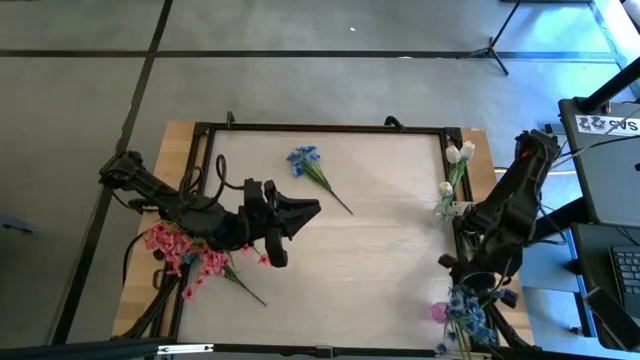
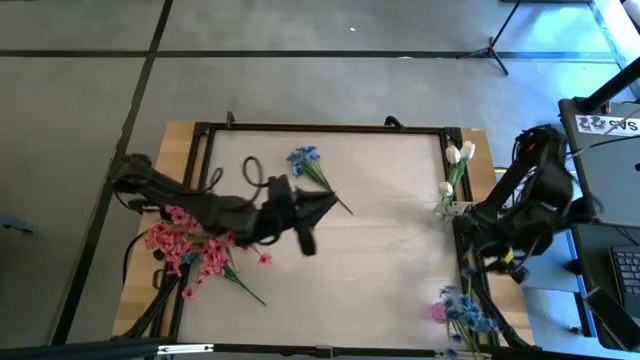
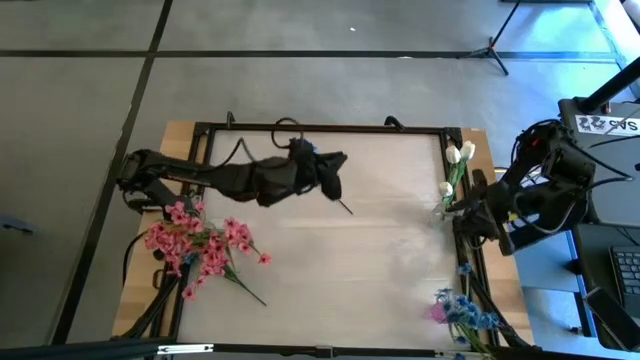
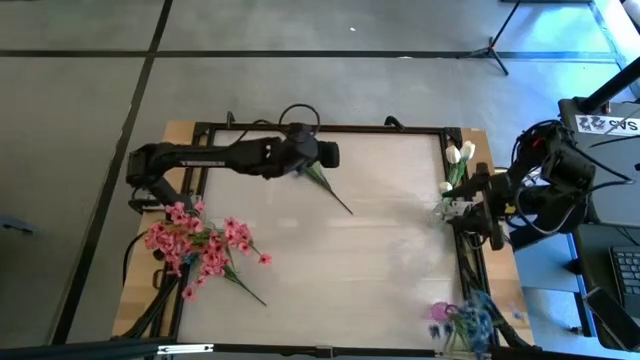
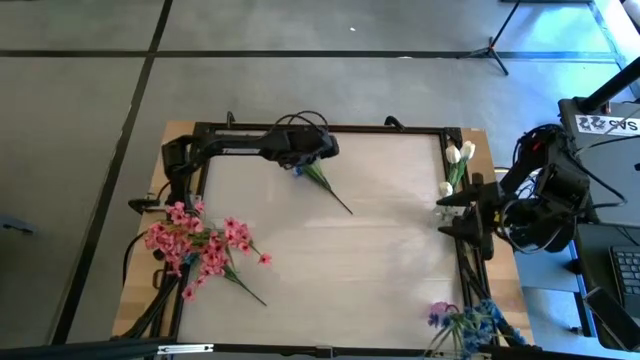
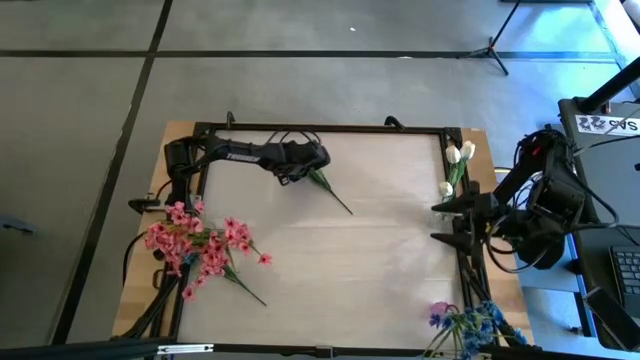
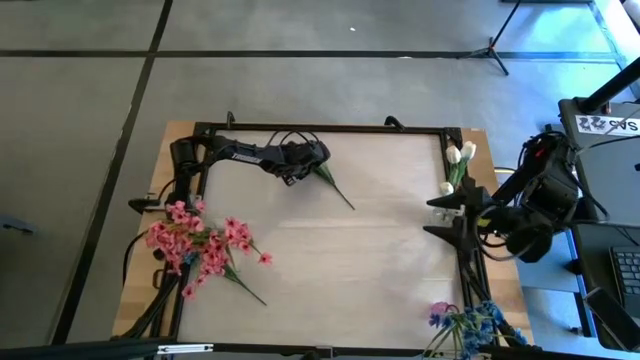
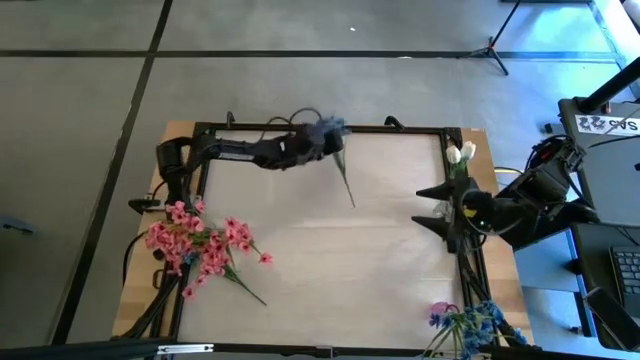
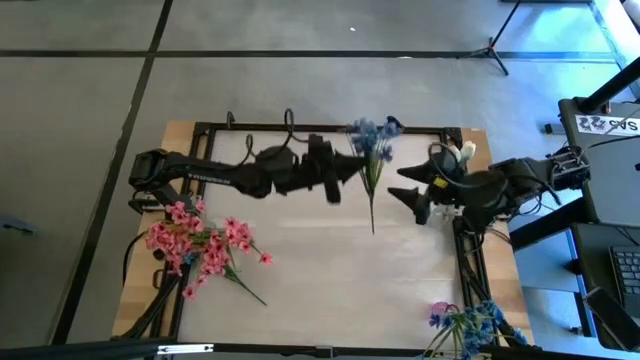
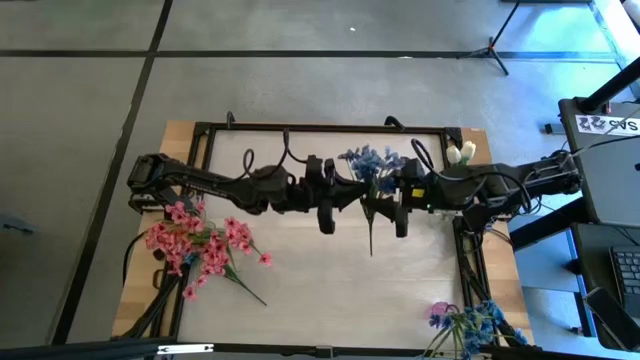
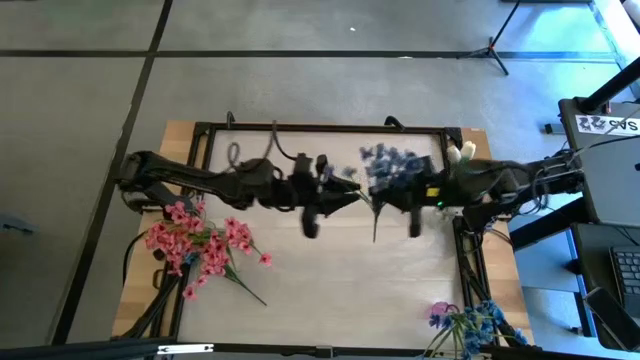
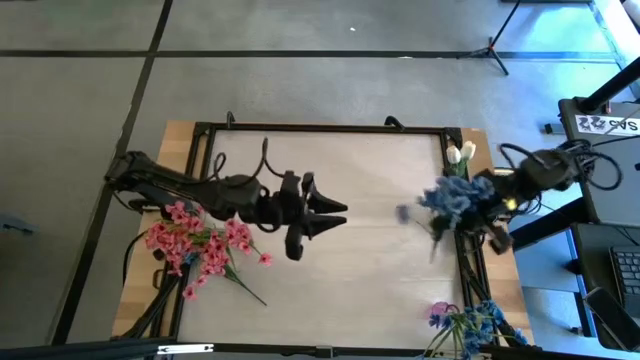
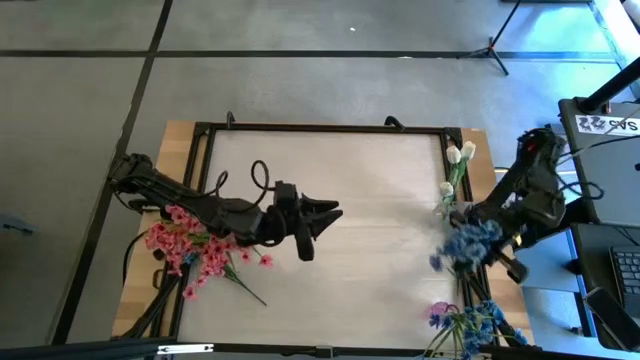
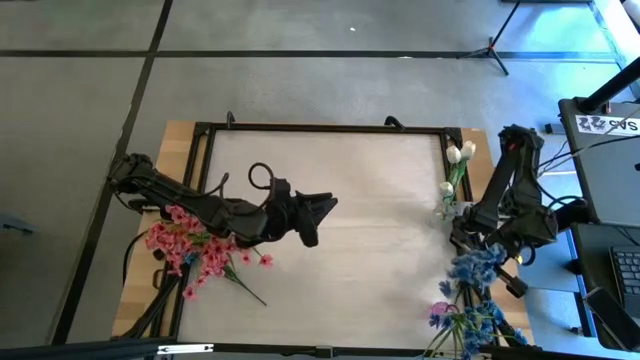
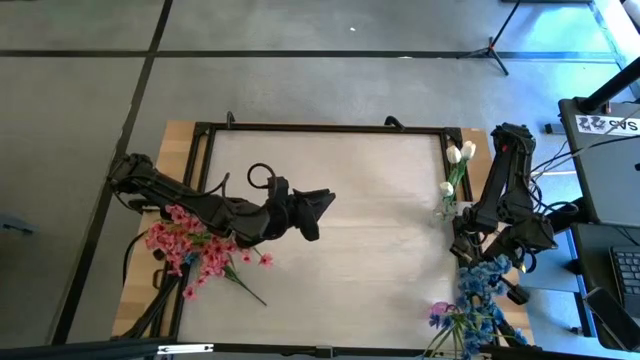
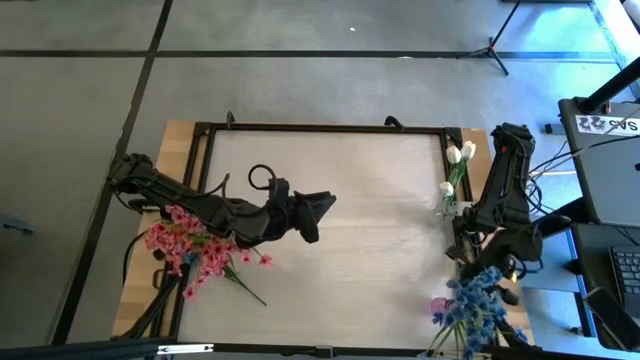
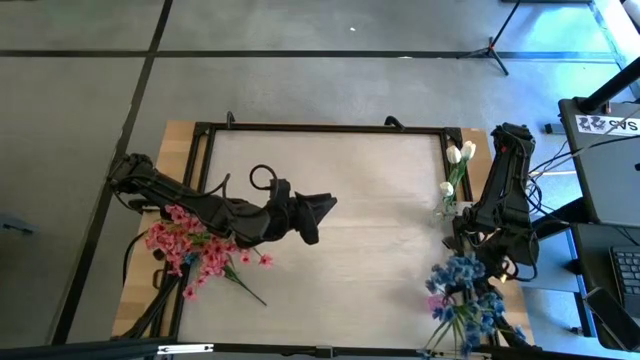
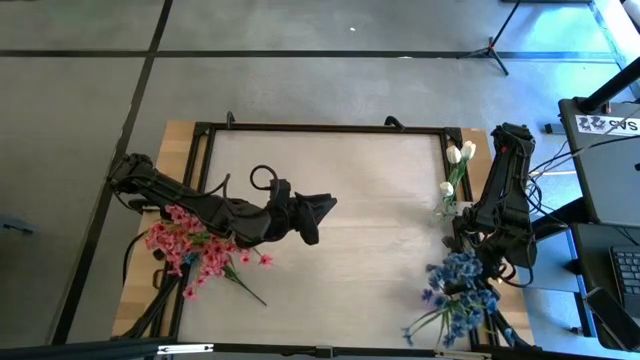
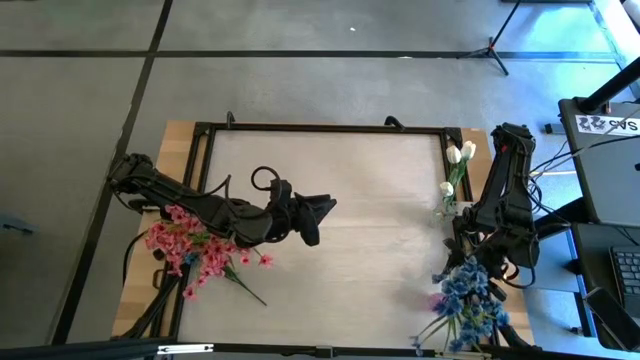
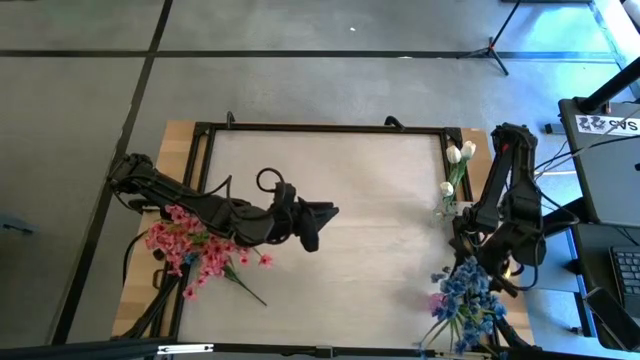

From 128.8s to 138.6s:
Task: Sort flowers into vase by color
Put the top blue flowers into the violet vase

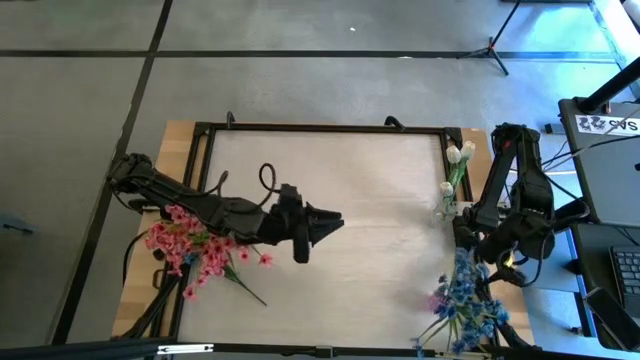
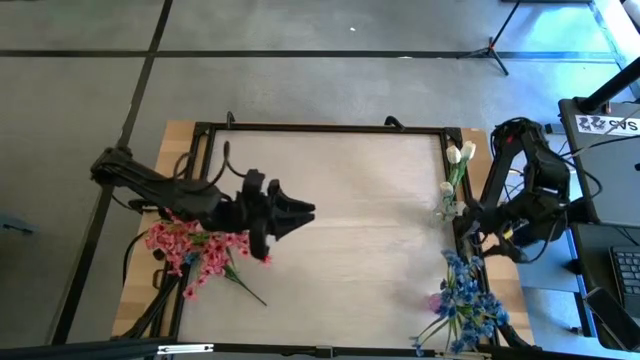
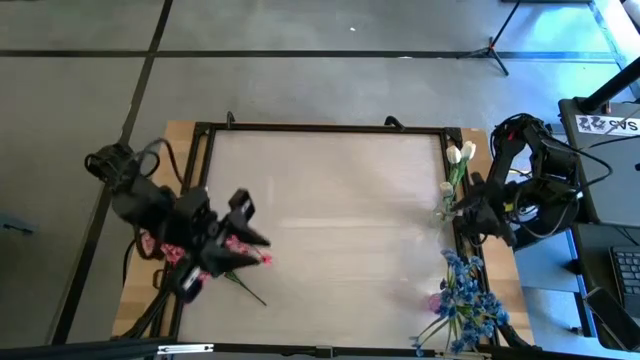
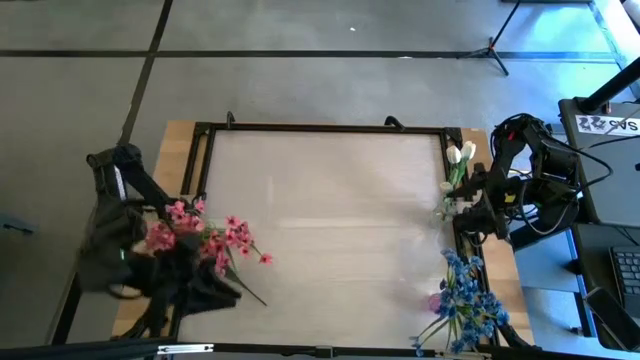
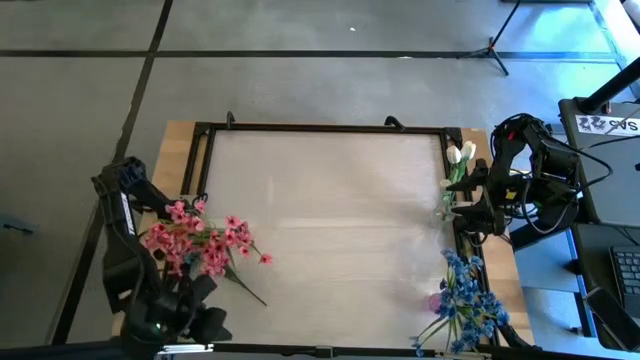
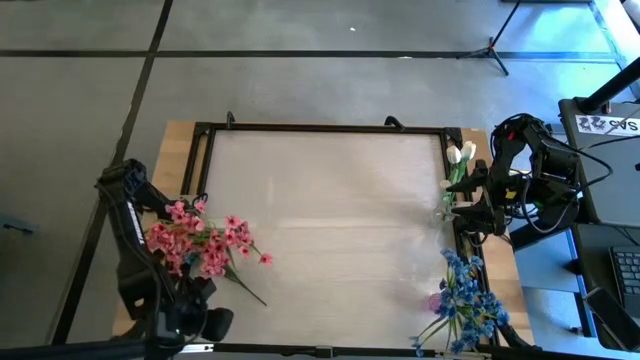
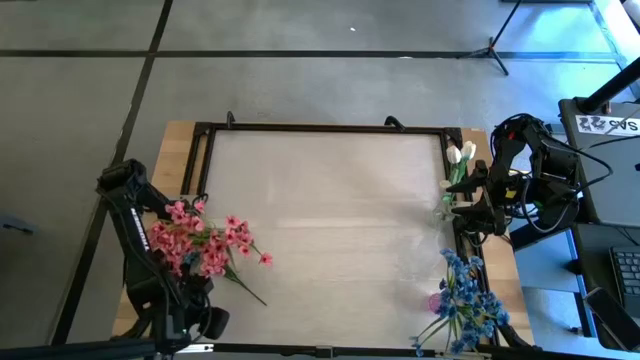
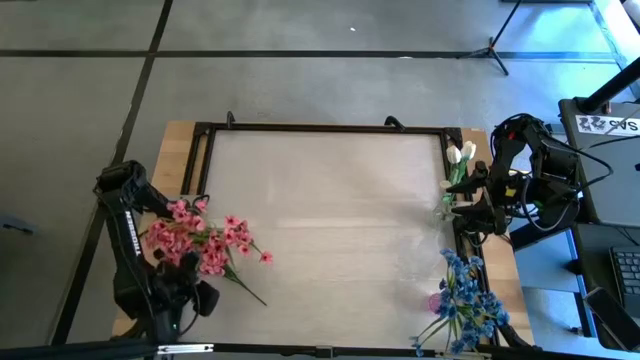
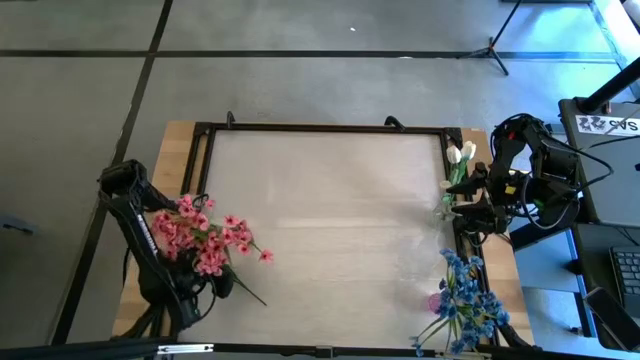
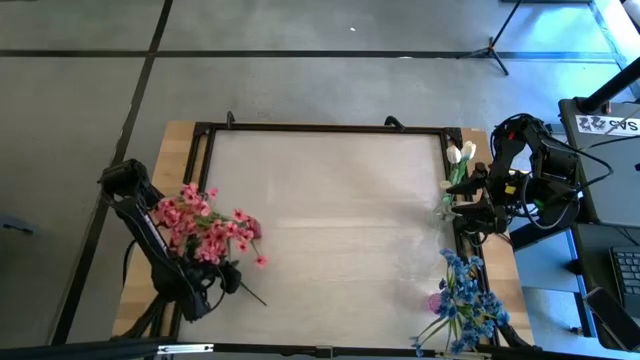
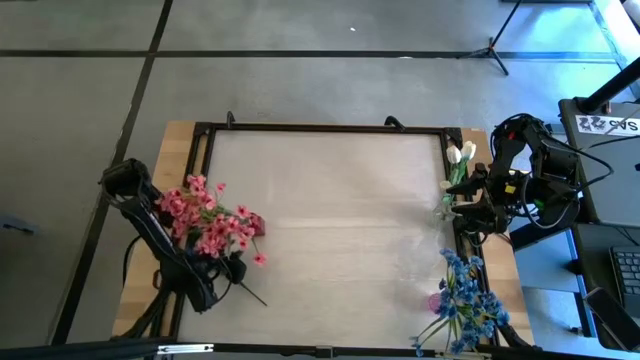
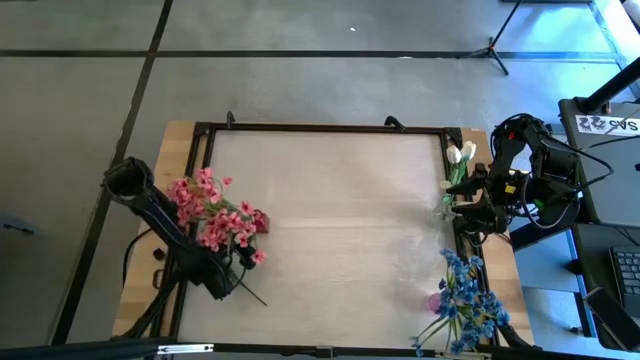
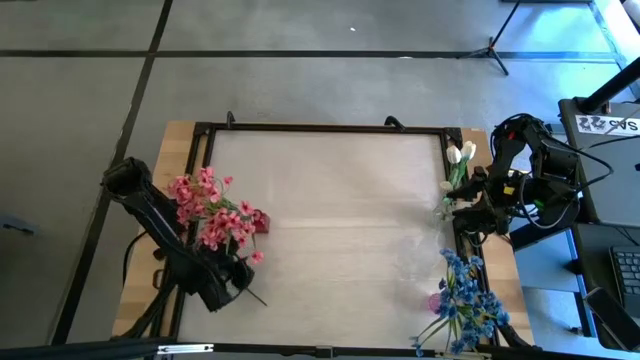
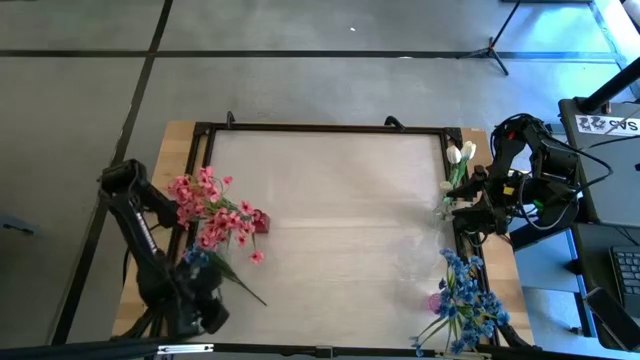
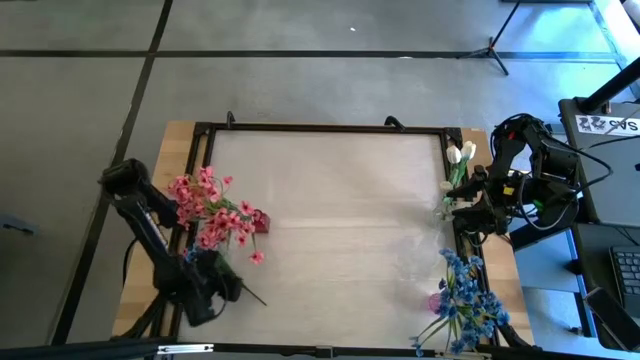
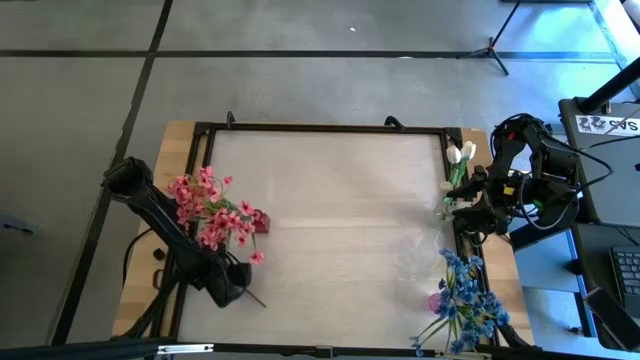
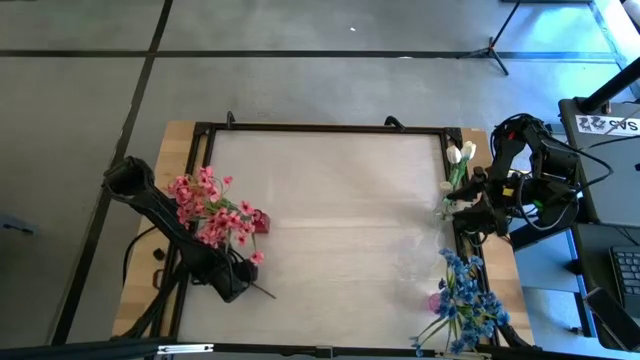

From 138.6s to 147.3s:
Put the blue flowers into the violet vase

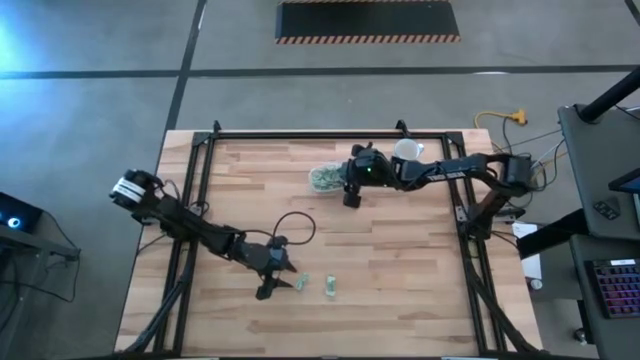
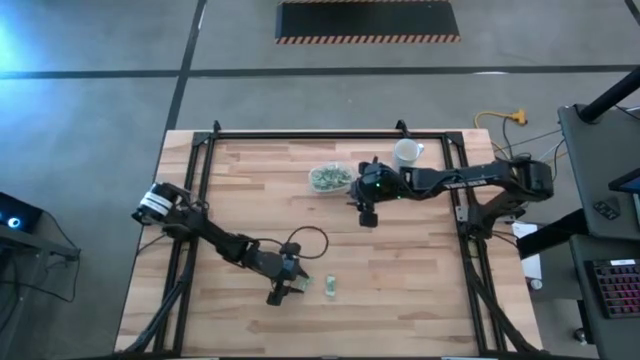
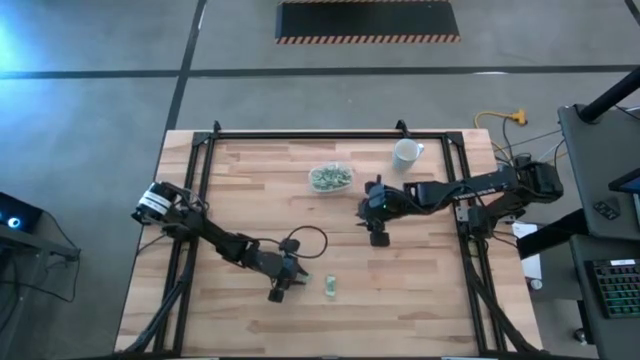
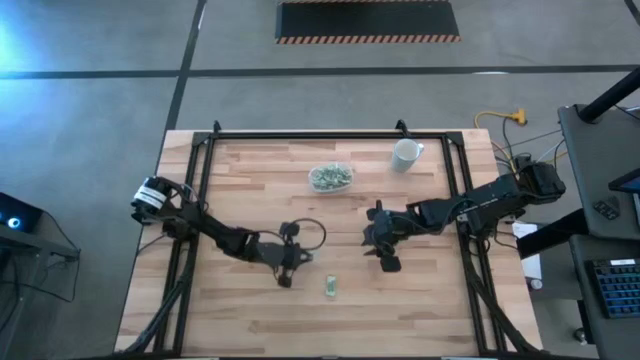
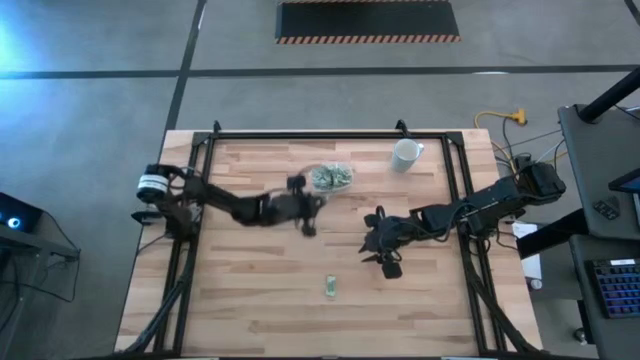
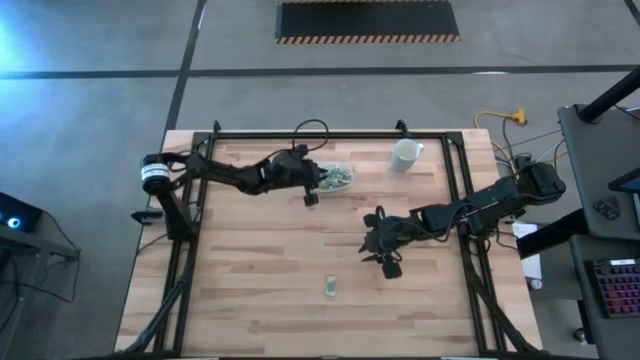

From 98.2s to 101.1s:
Task: Pick and place Stevia / Truvia into bins
Put the stevia packet into the transparent container

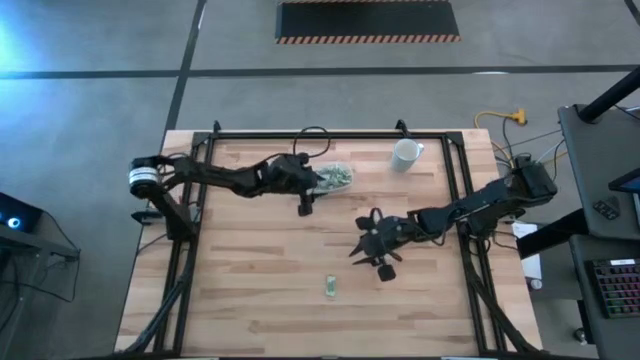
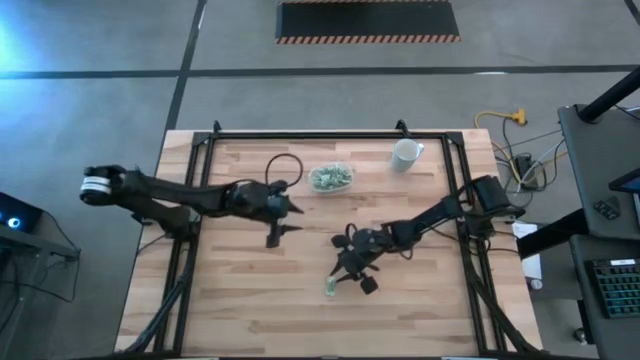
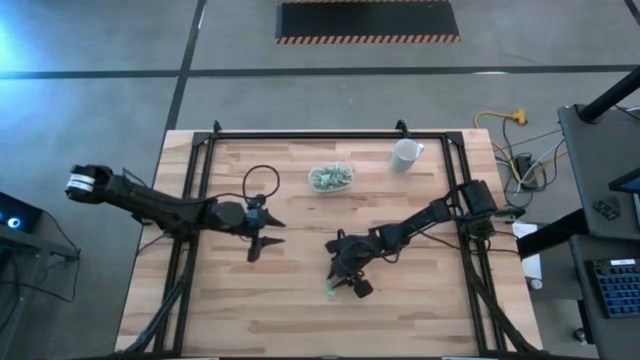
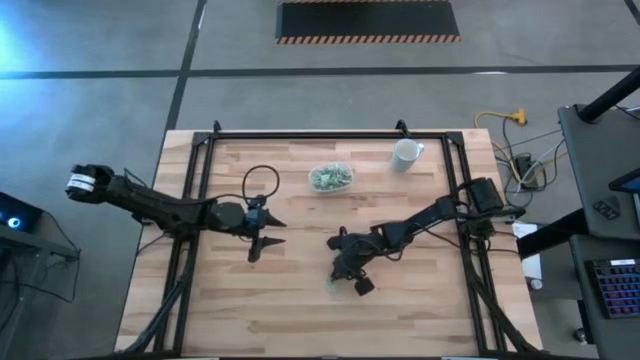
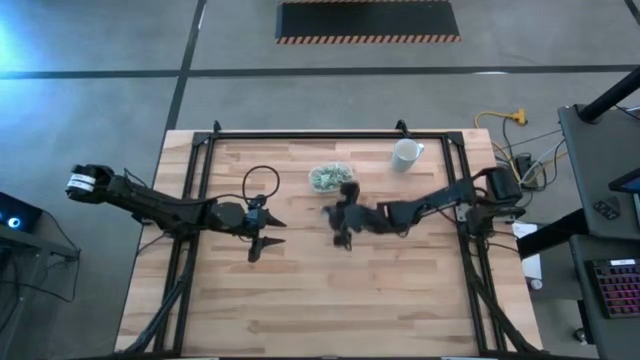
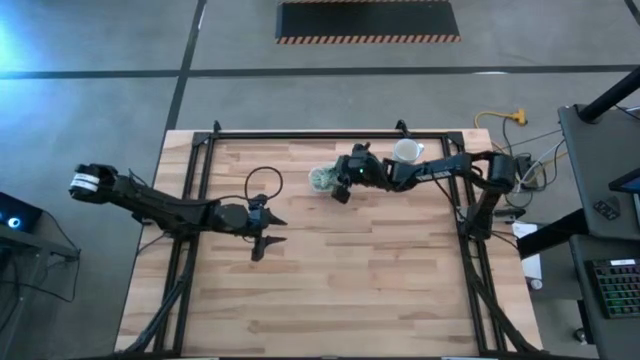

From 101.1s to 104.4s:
Put the stevia packet into the transparent container
